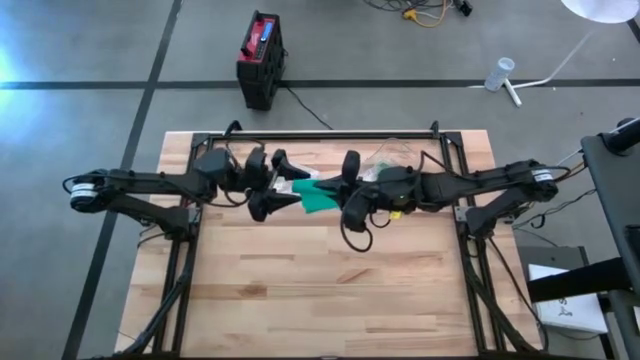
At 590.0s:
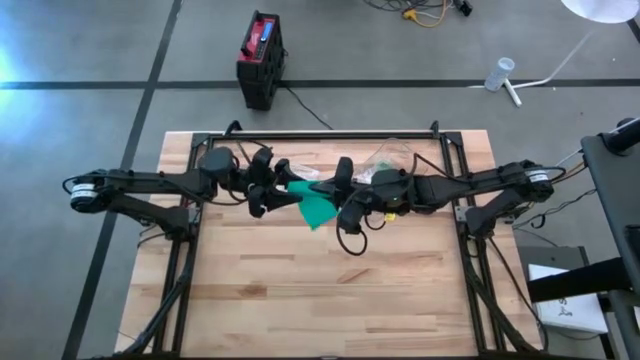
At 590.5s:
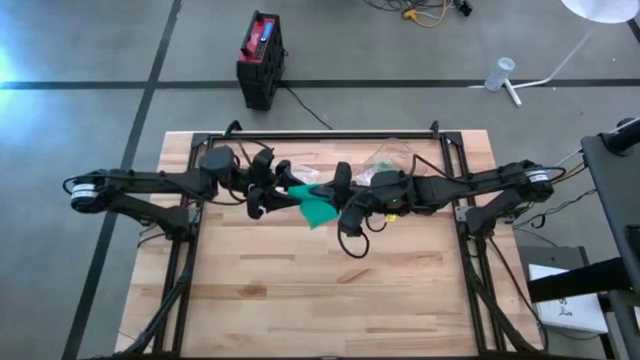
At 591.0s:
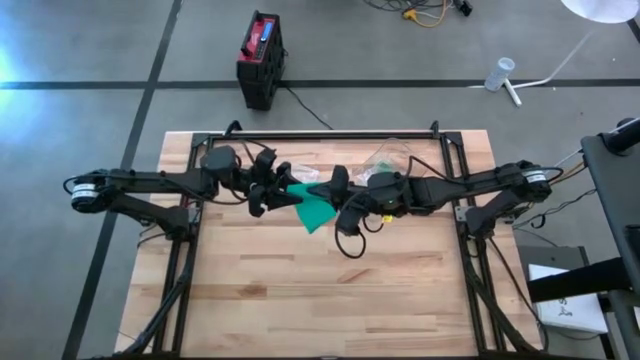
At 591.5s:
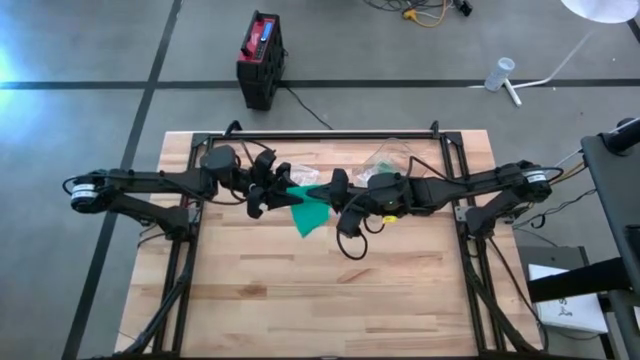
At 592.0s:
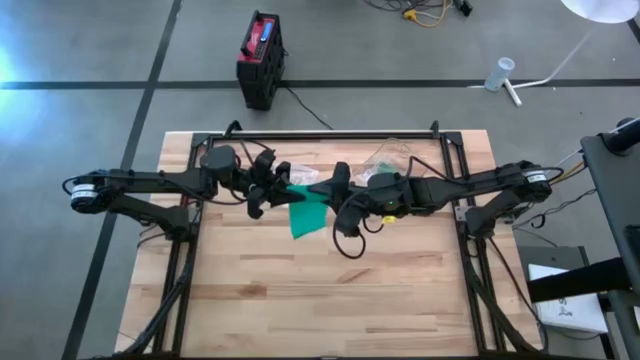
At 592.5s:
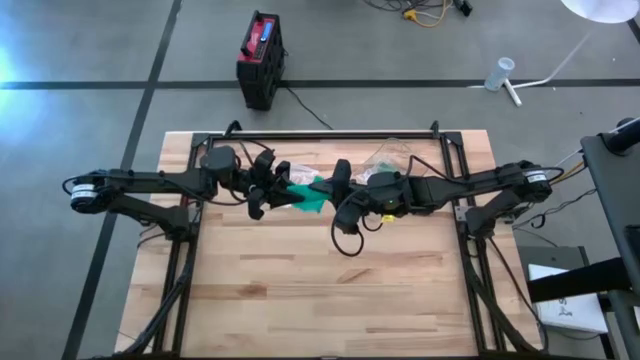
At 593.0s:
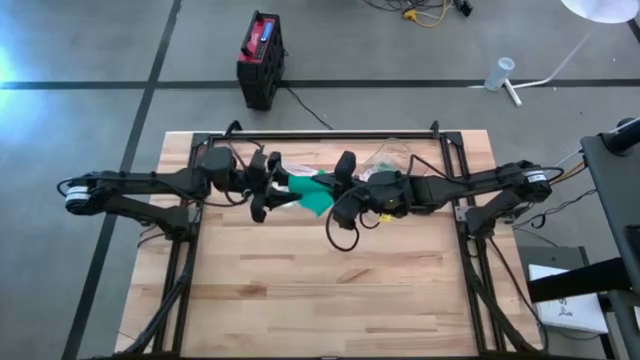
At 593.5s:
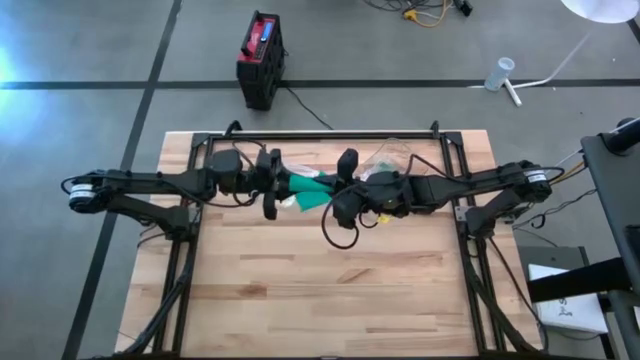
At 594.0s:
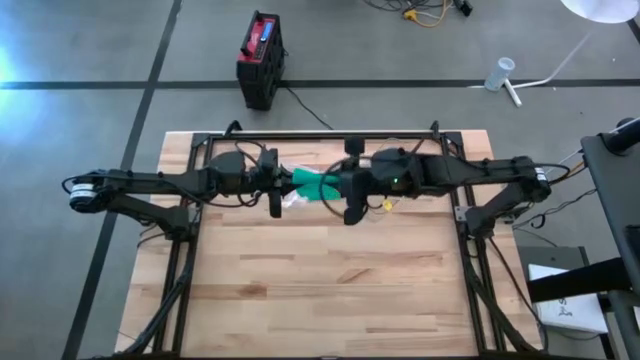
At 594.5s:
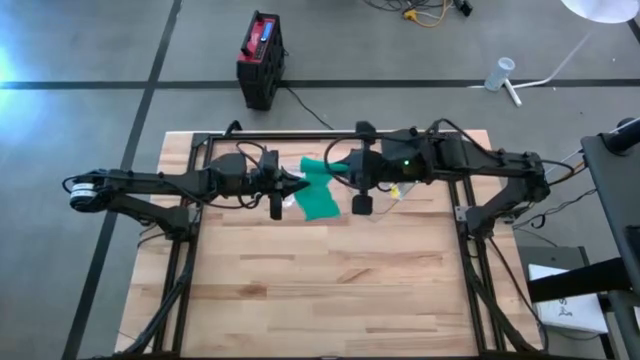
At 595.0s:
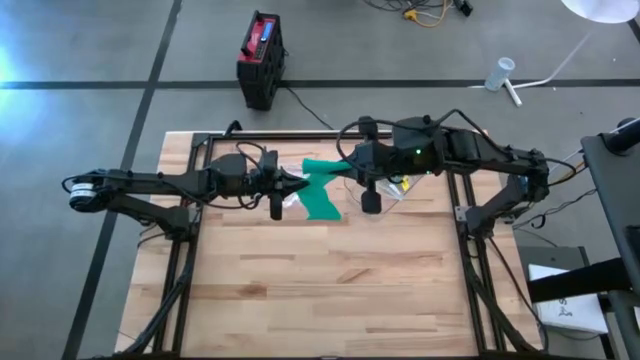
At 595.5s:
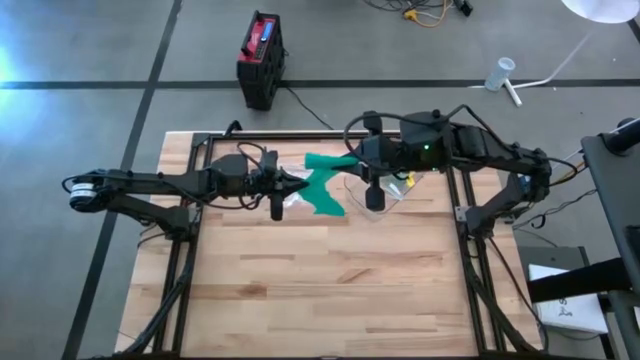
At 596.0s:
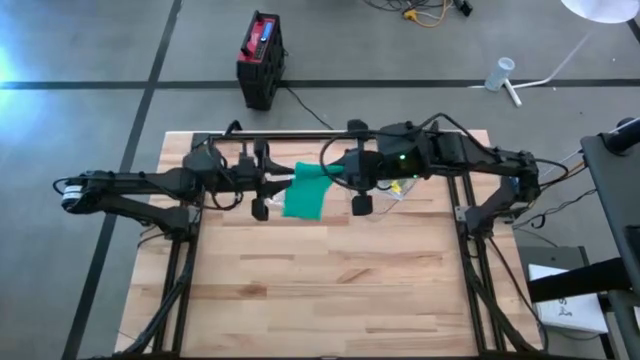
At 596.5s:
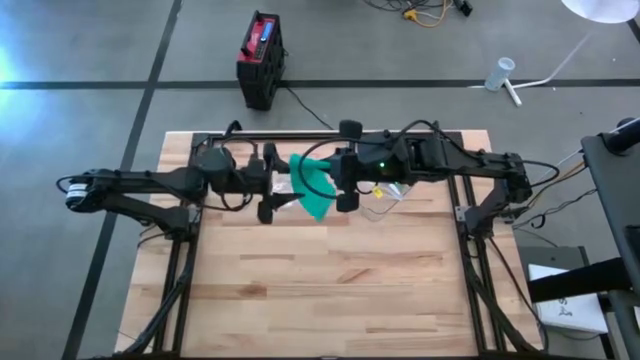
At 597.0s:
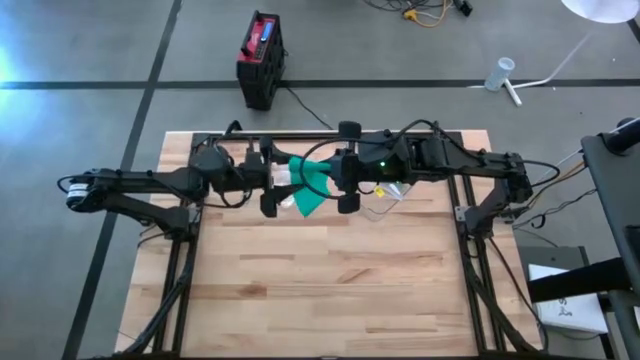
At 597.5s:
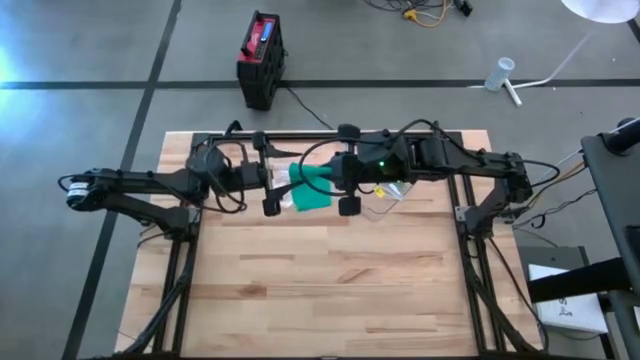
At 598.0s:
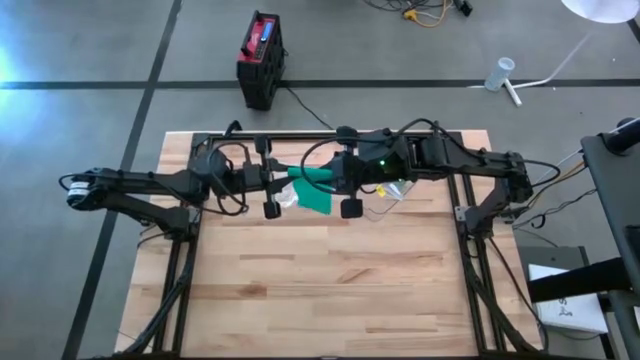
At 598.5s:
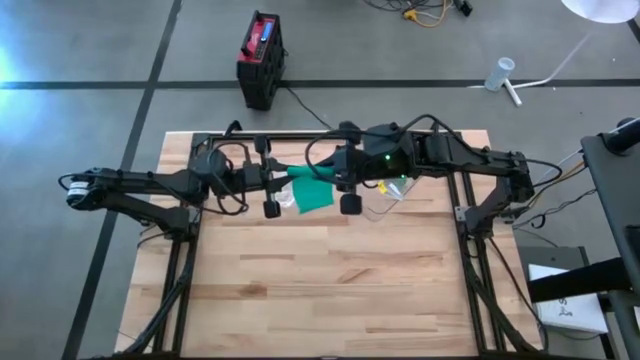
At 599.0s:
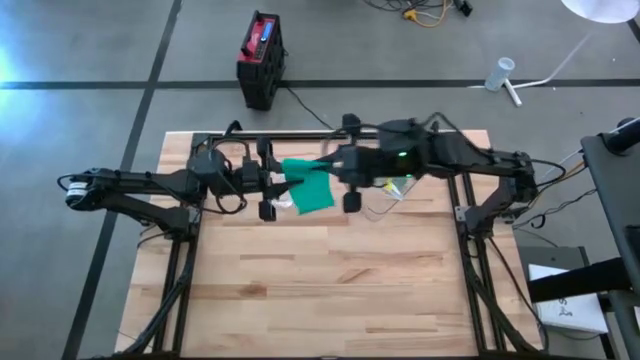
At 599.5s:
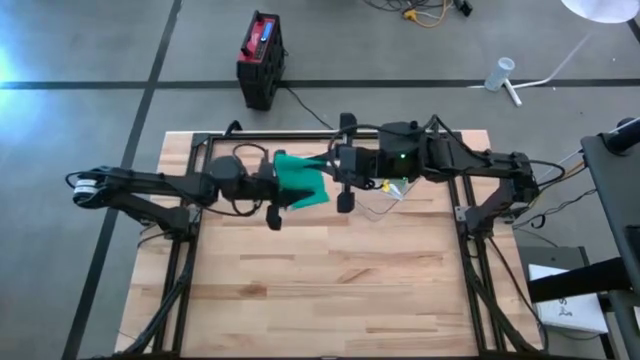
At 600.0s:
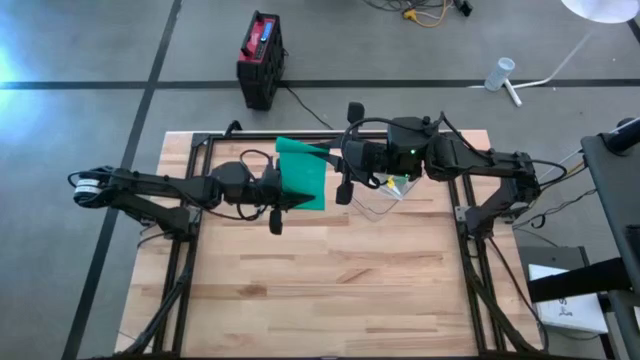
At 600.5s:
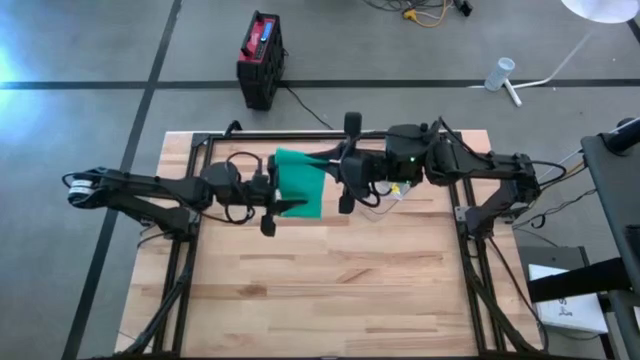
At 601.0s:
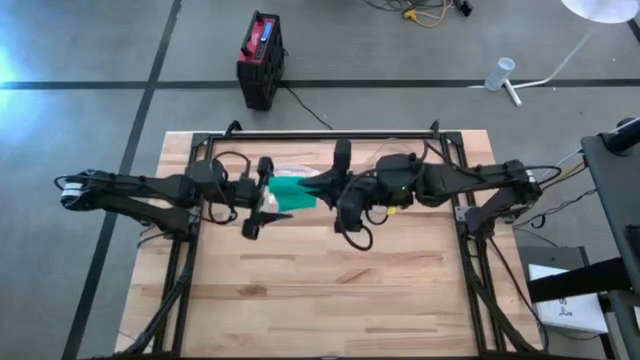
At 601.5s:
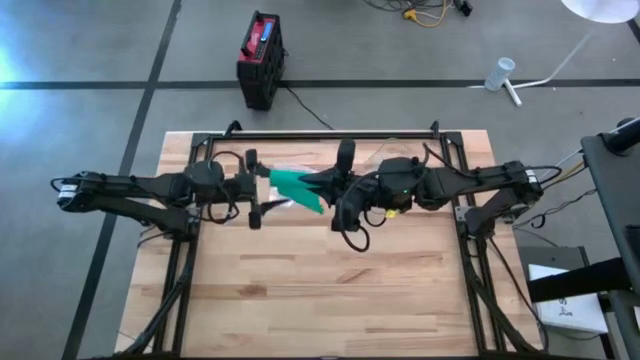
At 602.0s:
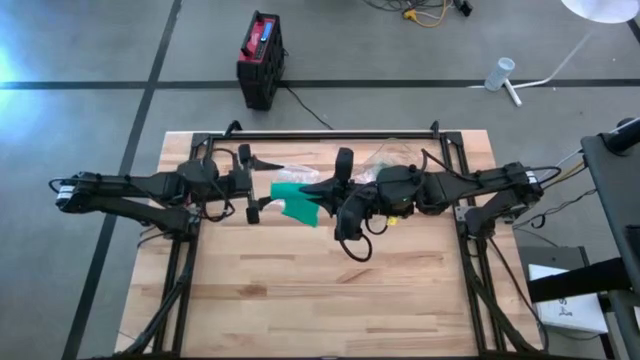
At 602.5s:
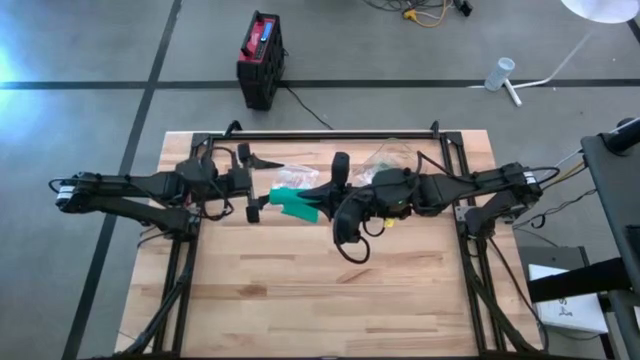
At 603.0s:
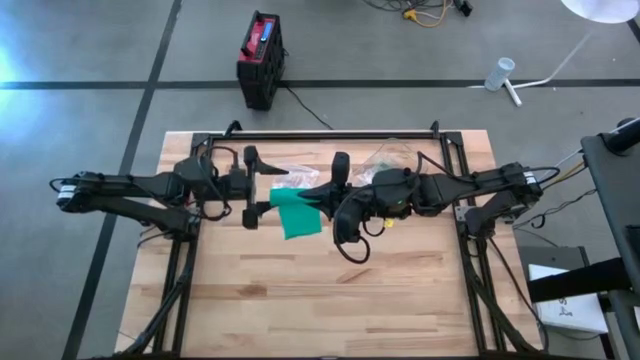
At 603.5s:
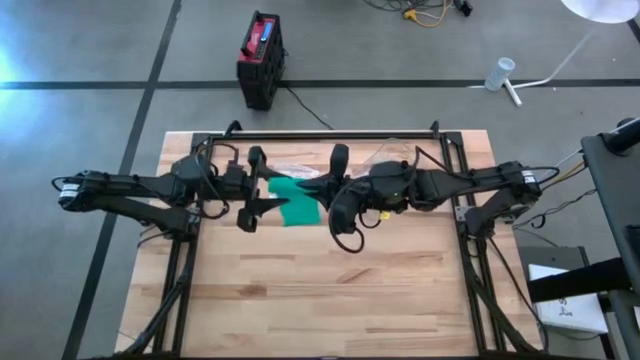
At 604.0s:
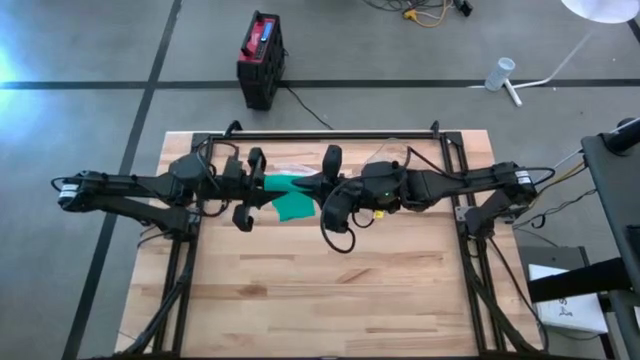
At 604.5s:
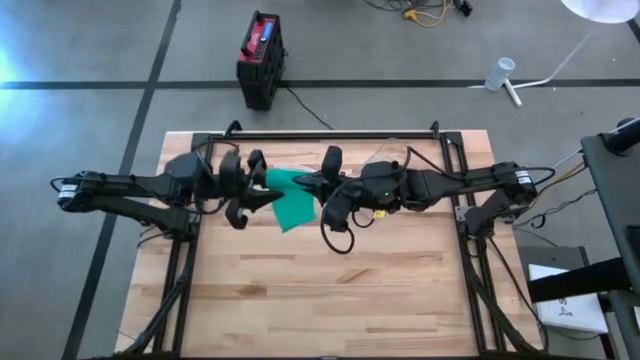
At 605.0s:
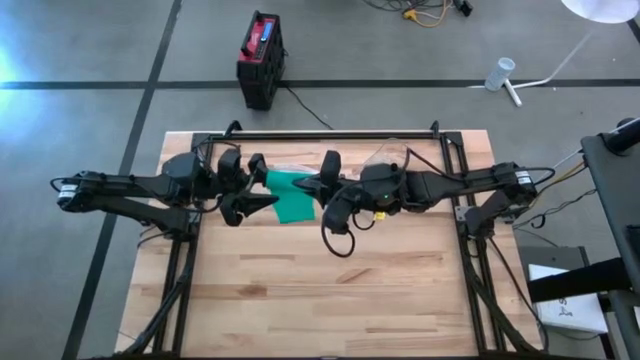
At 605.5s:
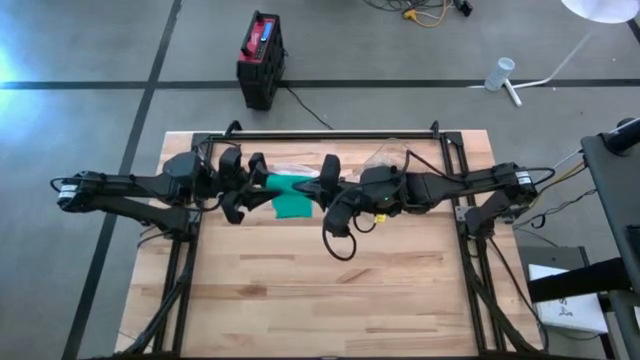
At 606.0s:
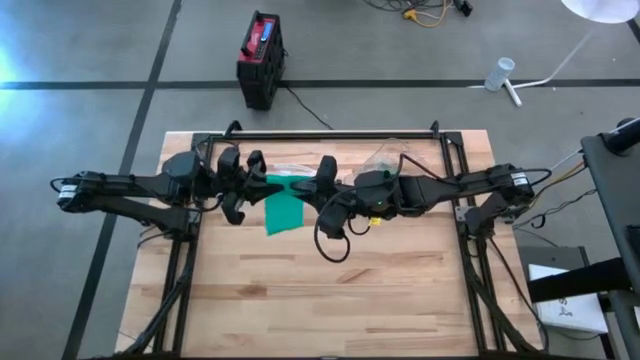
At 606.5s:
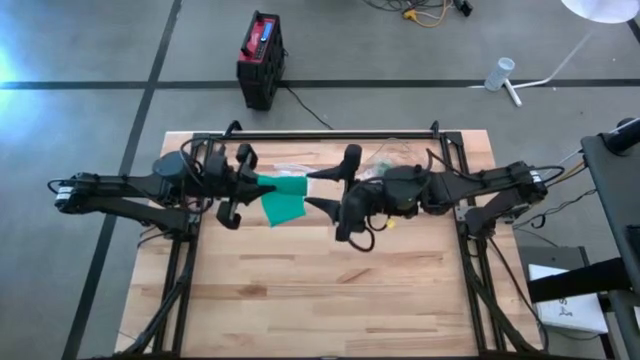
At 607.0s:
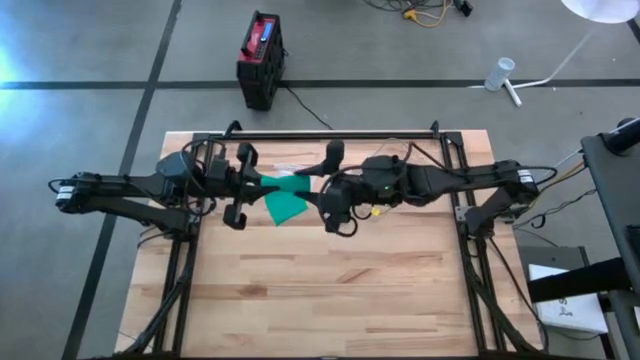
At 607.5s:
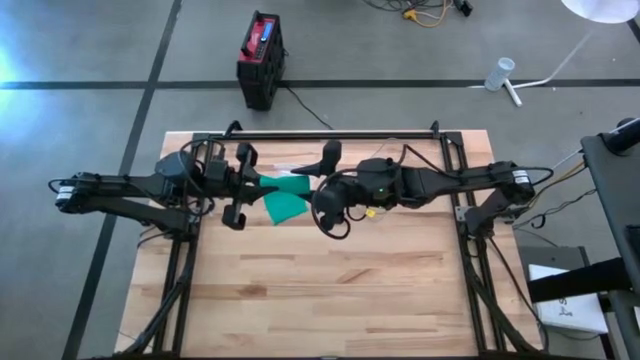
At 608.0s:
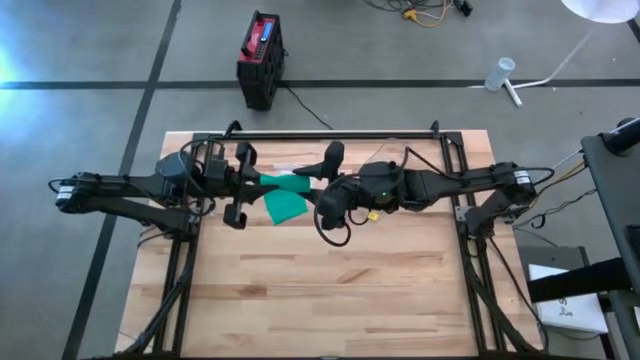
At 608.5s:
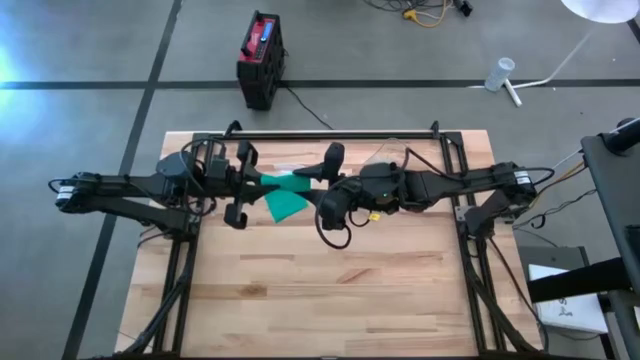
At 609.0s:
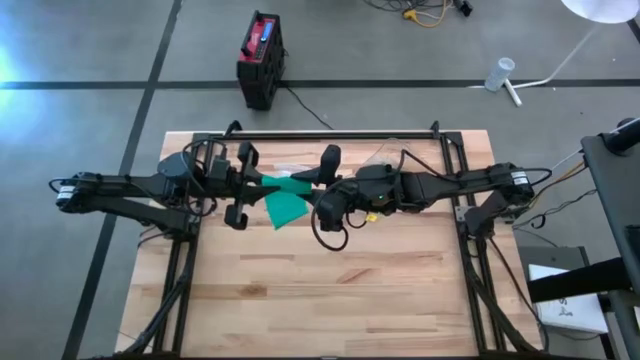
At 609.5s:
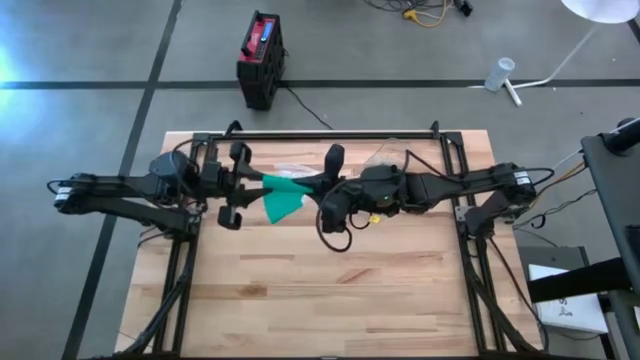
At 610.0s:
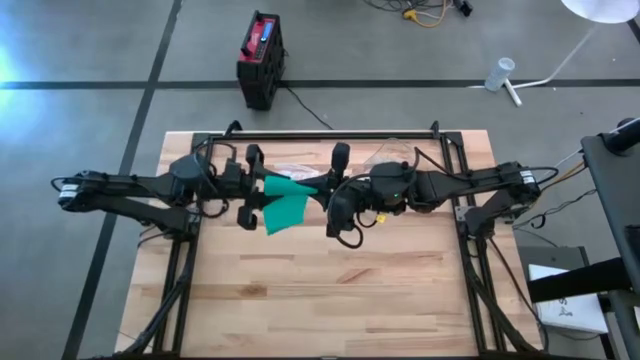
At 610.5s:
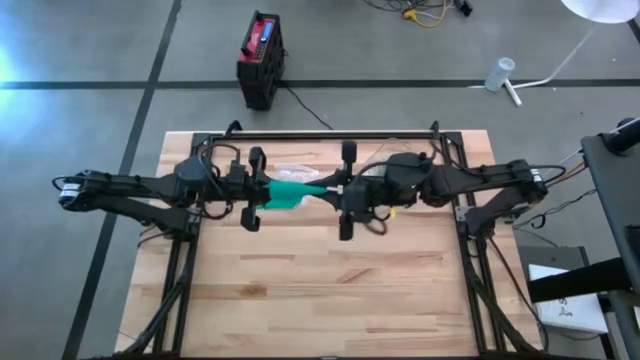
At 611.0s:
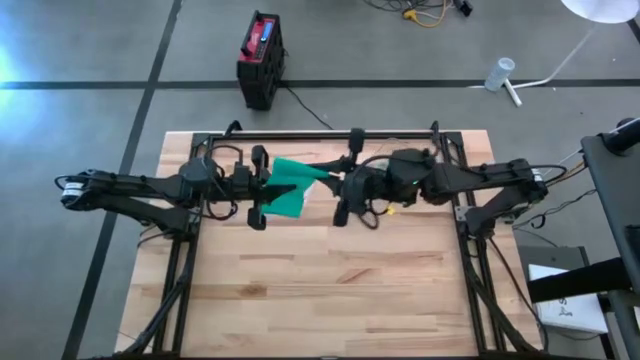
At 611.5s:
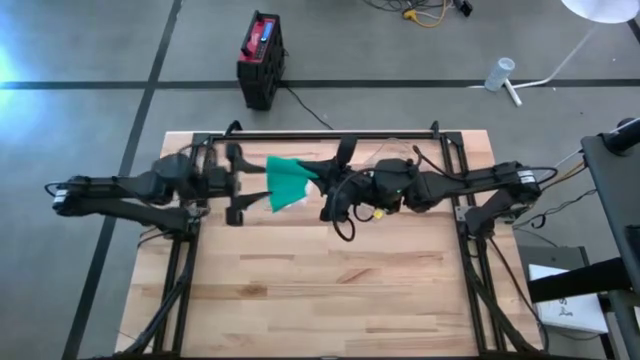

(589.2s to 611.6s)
Task: Roll bandage
Roll the dark green bandage
